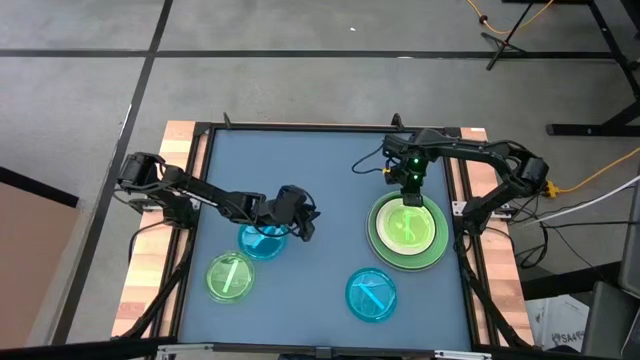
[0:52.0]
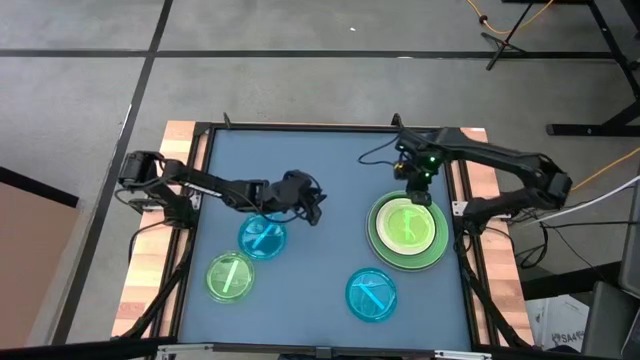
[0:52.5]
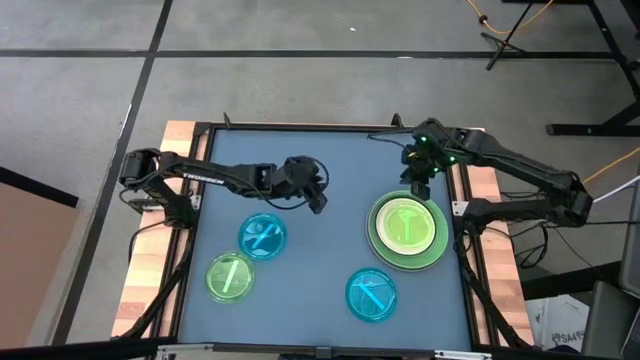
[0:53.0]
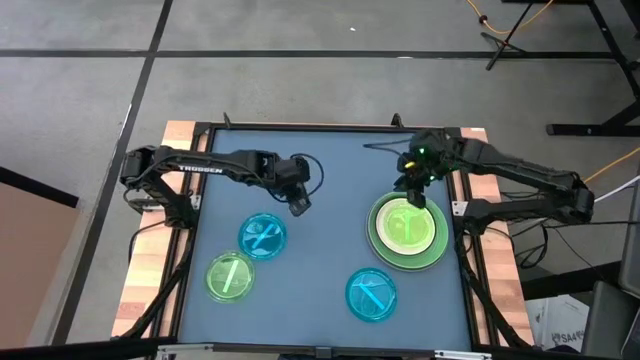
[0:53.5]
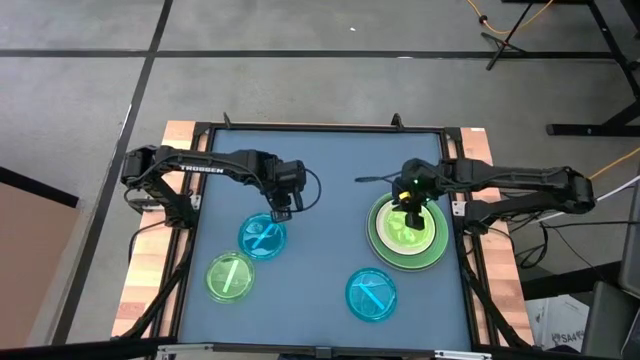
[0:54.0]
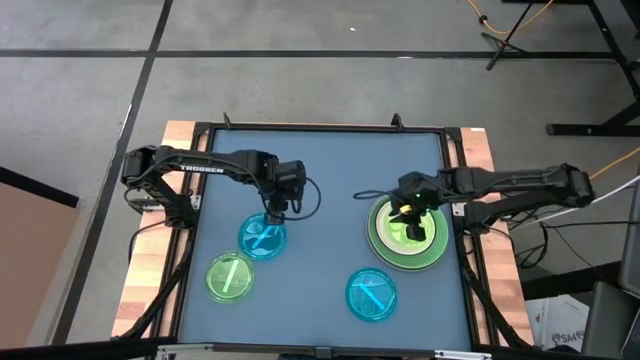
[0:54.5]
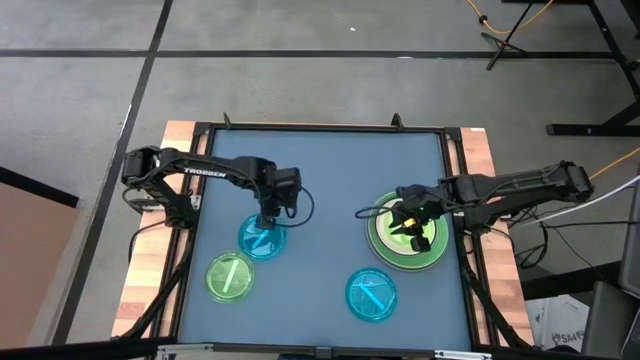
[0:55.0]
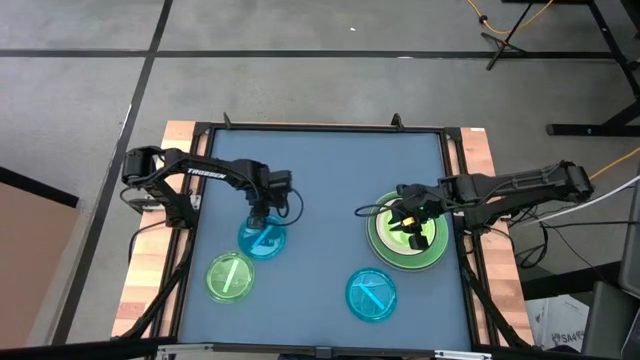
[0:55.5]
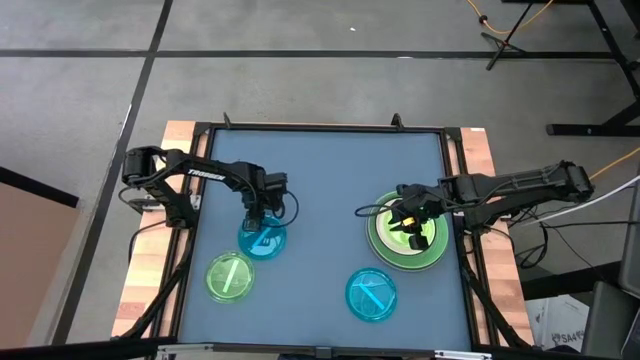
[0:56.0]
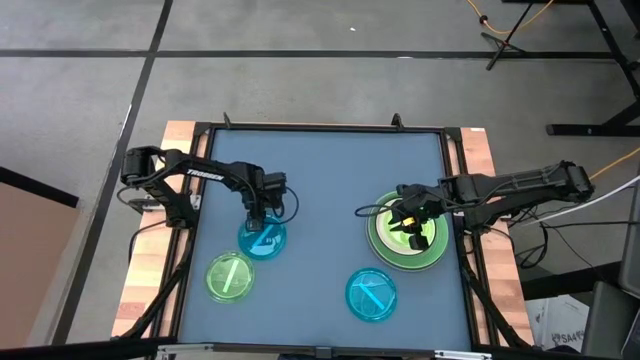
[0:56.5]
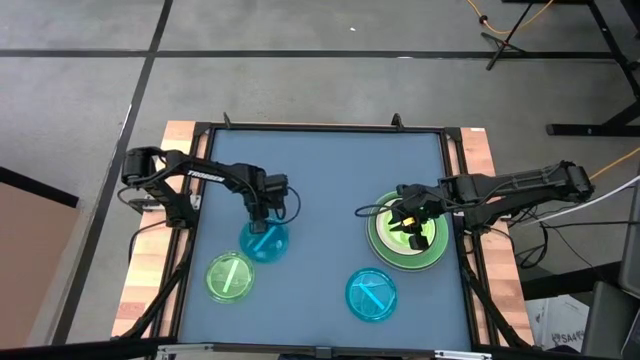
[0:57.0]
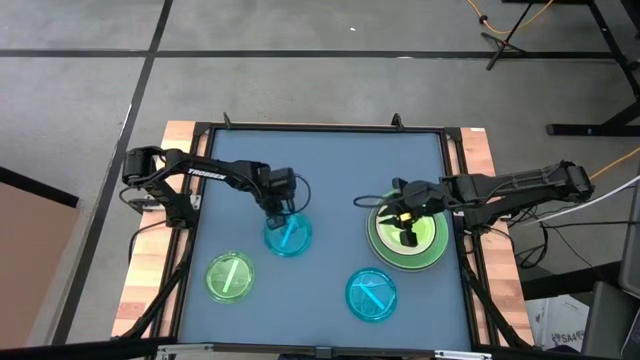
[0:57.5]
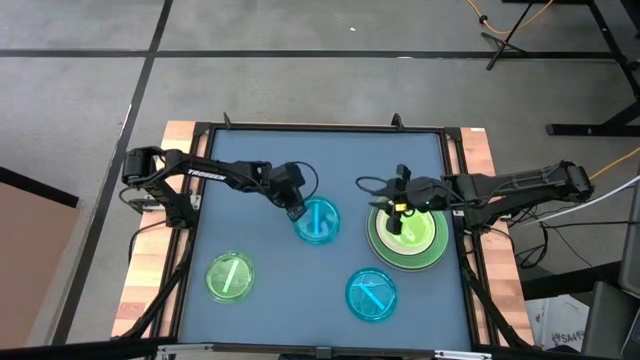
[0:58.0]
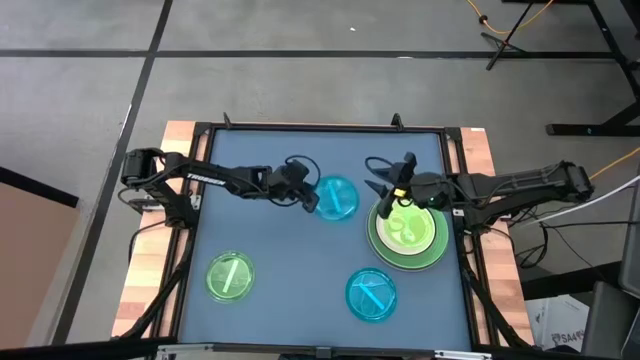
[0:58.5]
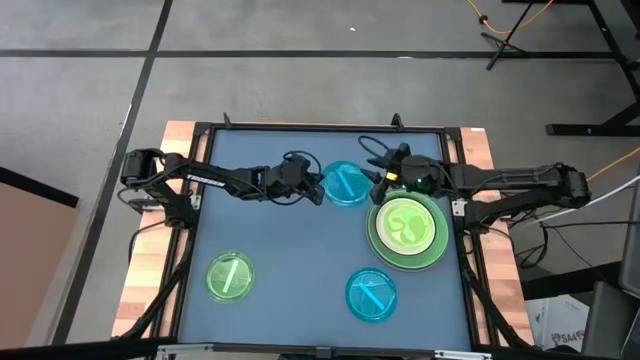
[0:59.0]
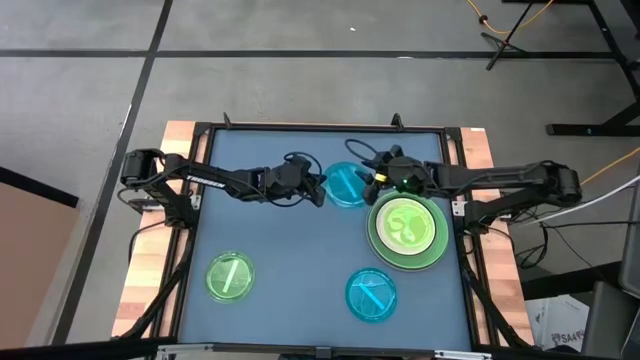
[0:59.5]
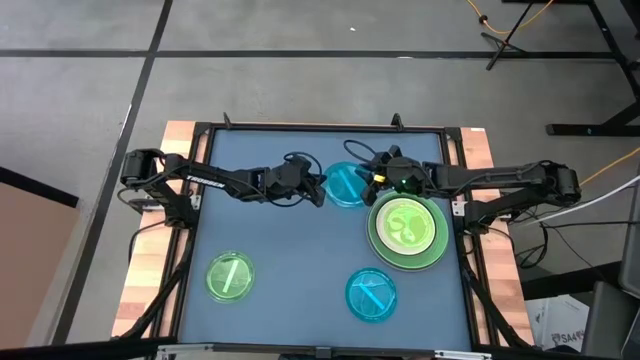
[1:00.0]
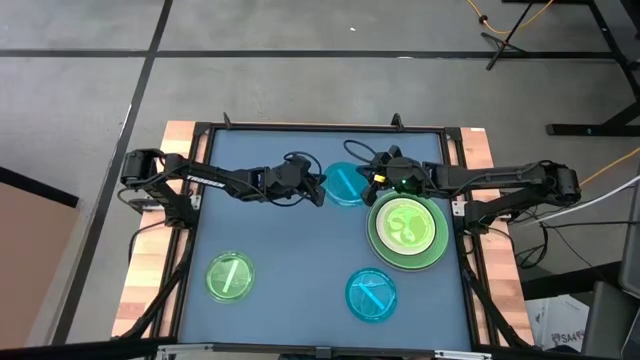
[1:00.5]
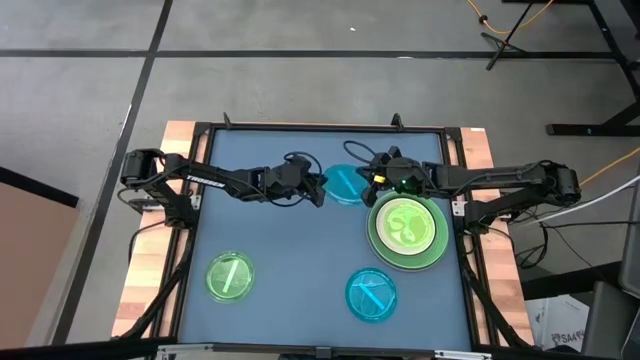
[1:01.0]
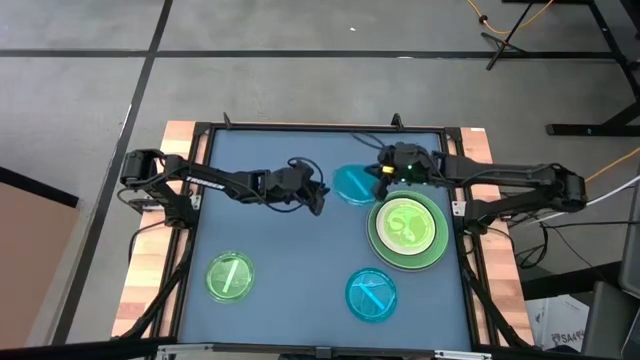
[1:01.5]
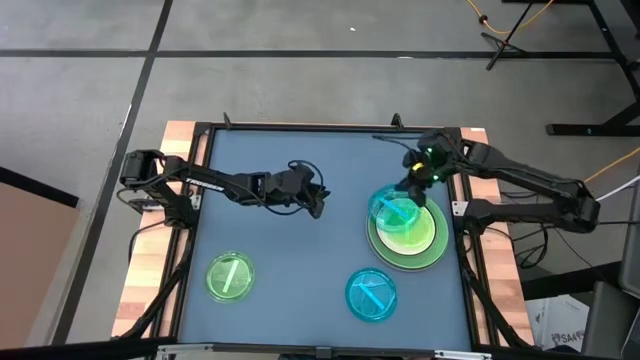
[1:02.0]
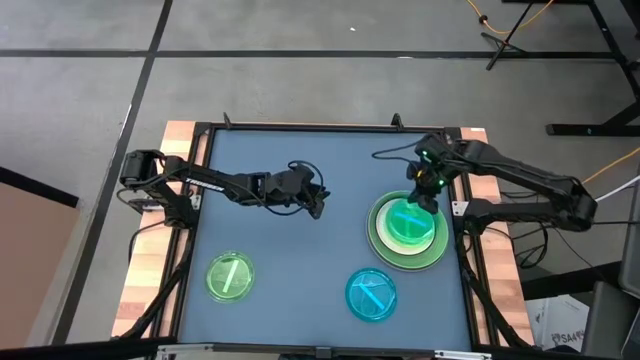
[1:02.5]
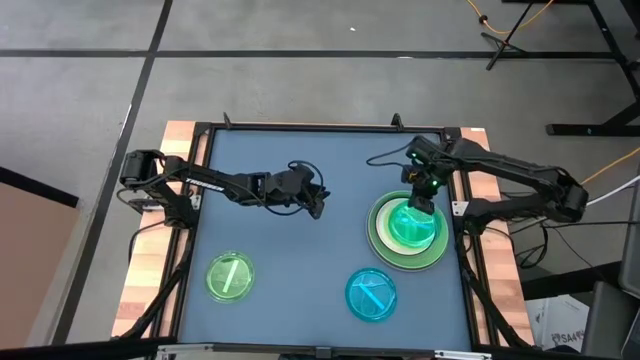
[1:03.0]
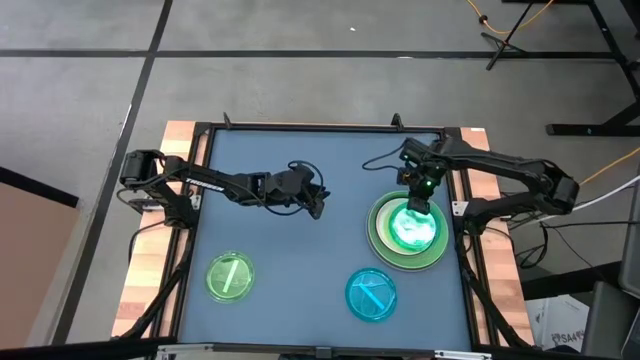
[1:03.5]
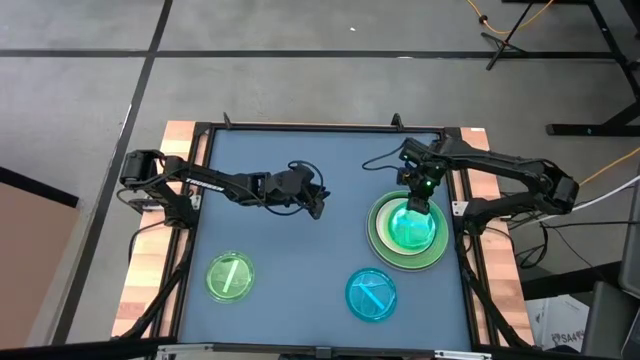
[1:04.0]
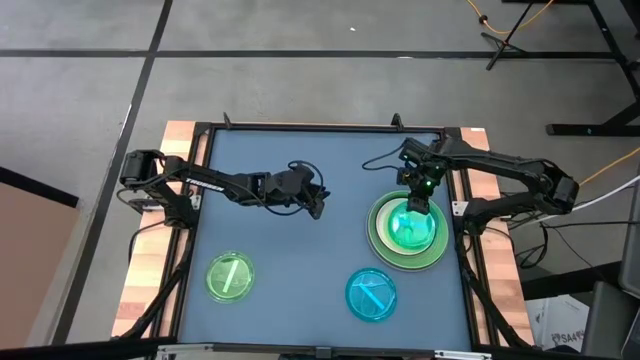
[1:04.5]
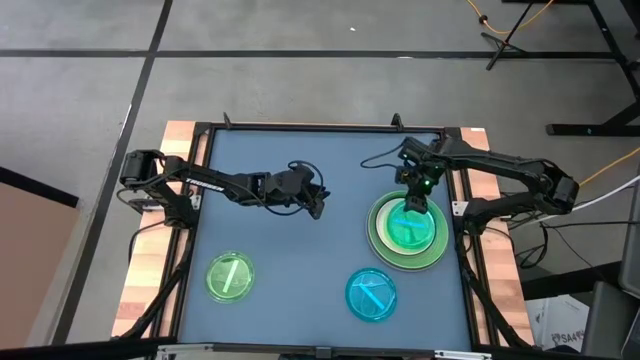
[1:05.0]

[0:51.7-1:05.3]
Task: Stack plastic plates
Stack the top blue plate on top of the green plate

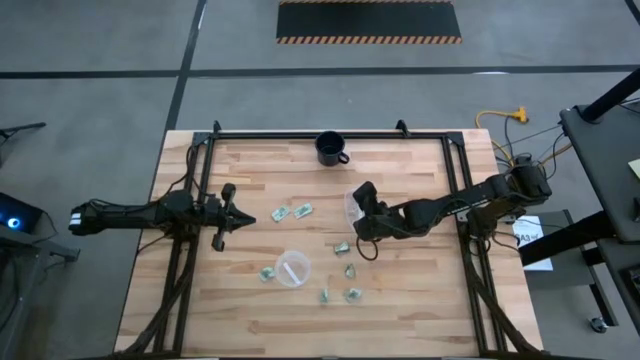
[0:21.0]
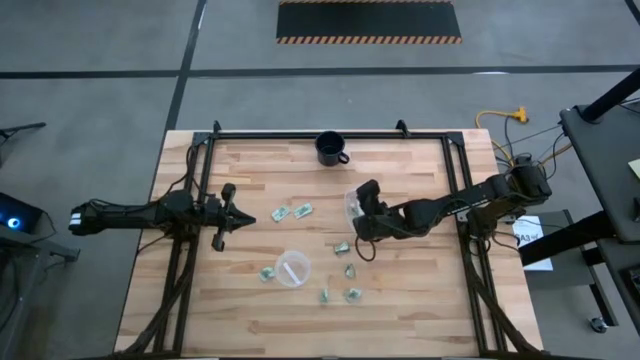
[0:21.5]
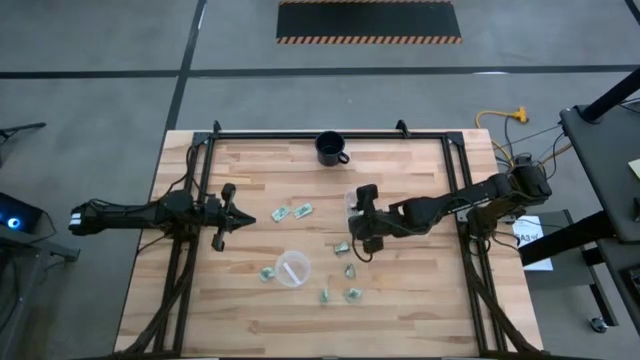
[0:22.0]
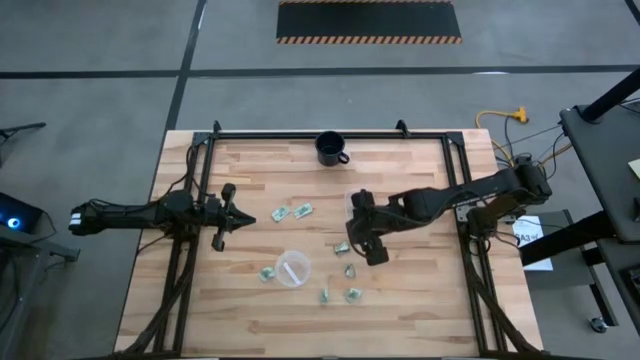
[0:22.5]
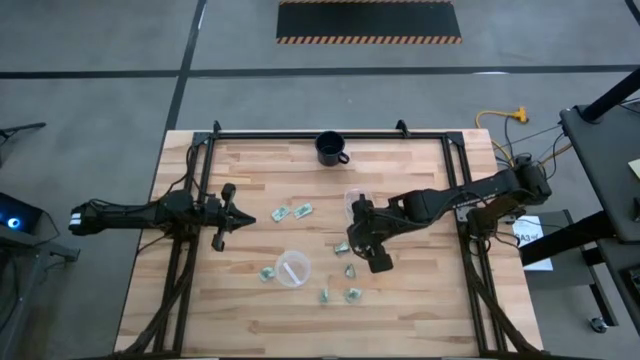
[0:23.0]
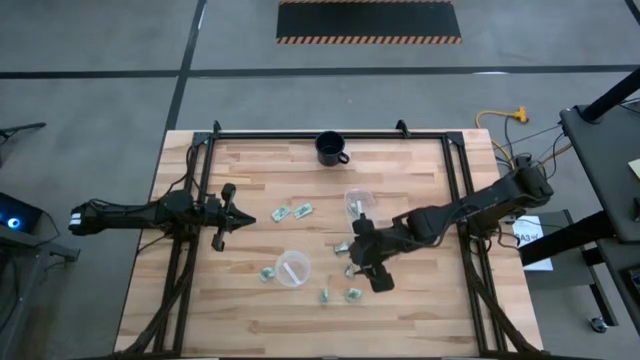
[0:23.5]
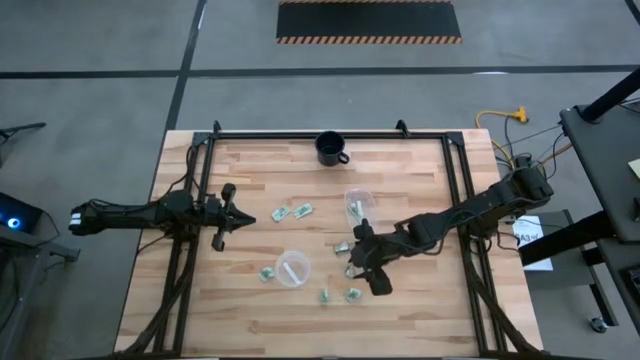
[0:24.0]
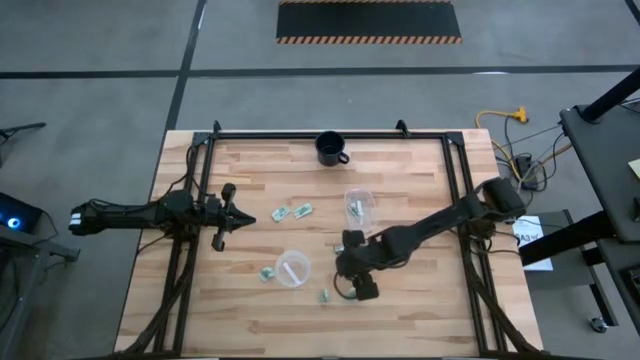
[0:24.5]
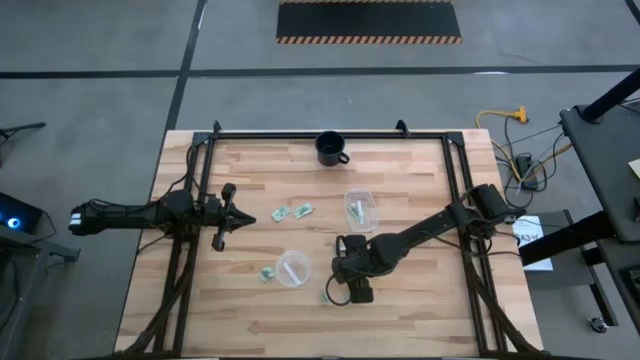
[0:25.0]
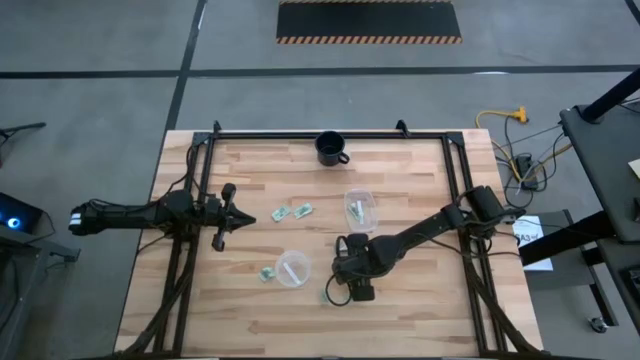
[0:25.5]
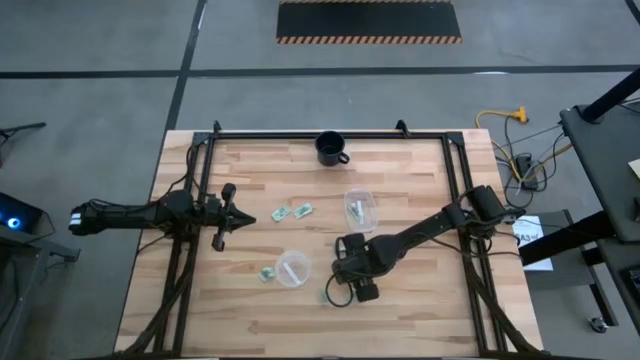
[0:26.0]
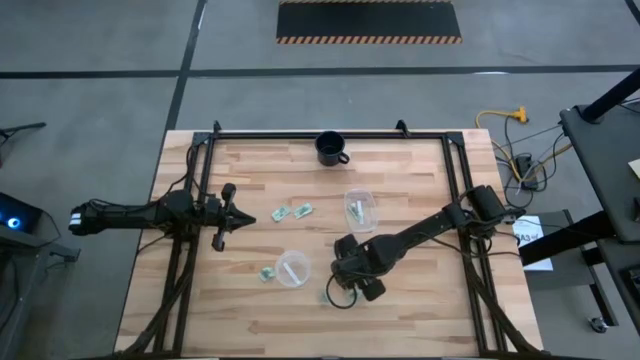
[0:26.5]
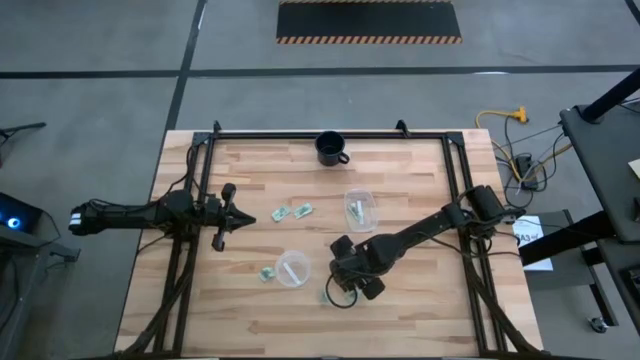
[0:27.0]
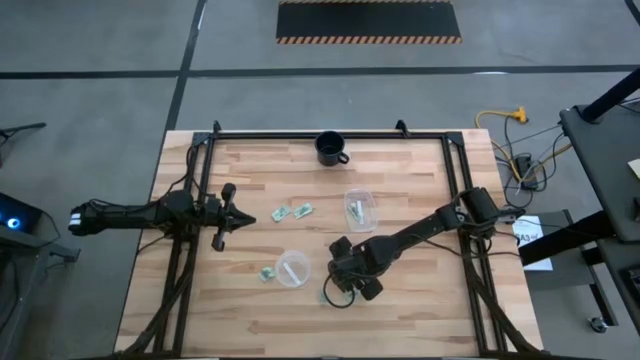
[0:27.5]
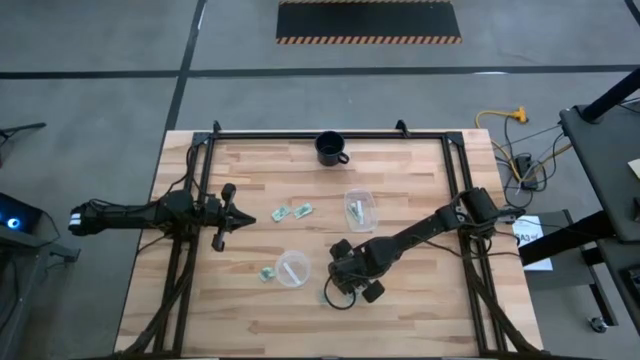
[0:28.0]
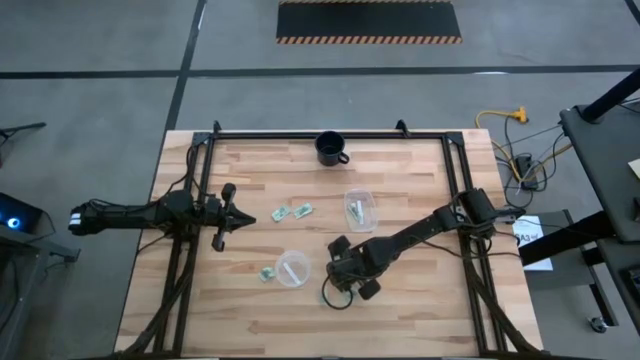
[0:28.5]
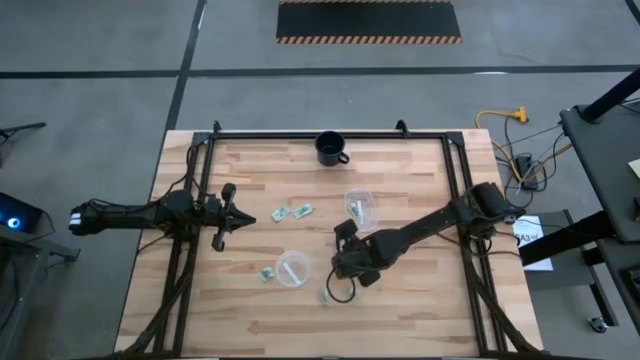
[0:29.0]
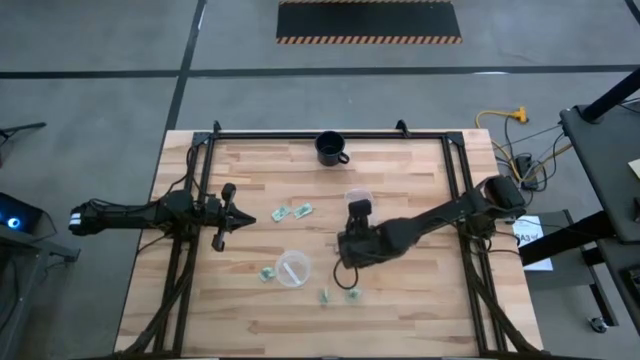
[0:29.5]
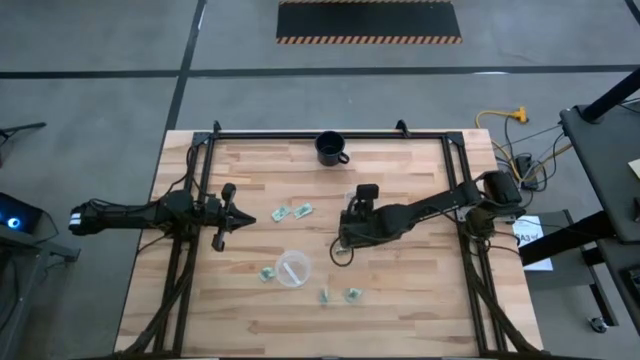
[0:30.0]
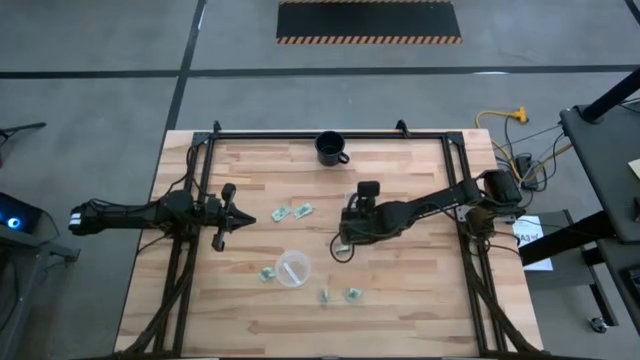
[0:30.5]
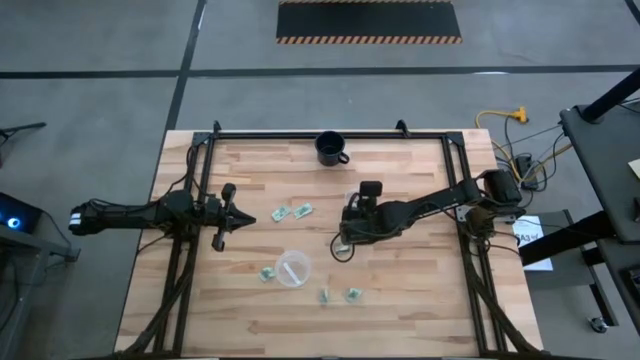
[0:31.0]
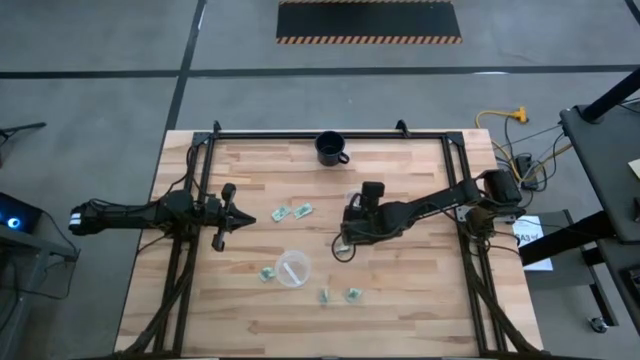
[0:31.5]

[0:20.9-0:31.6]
Task: Pick and place items into bin
Put the green stevia packet into the right transparent bin
